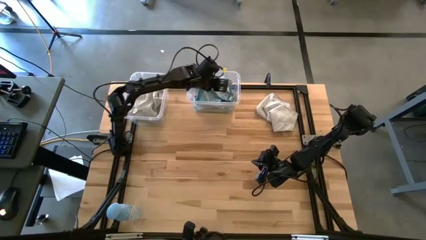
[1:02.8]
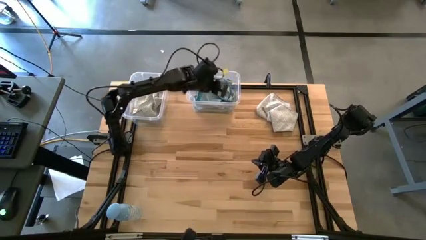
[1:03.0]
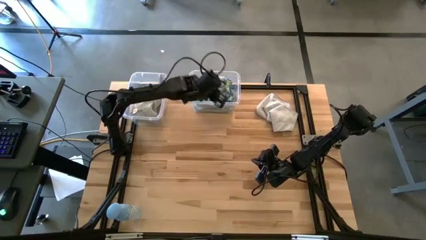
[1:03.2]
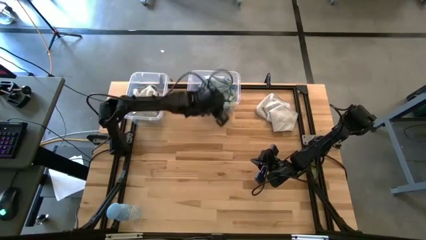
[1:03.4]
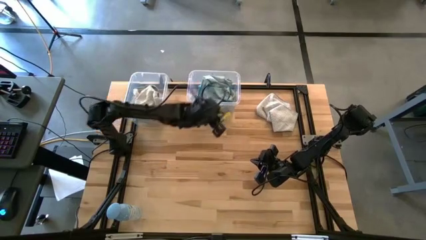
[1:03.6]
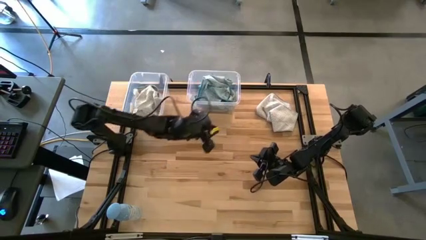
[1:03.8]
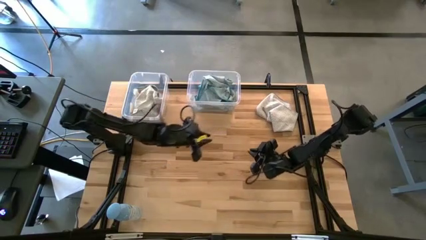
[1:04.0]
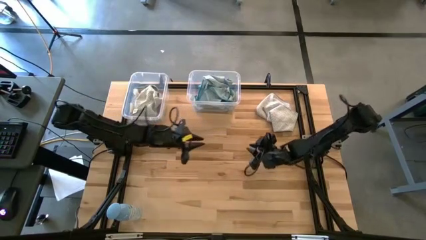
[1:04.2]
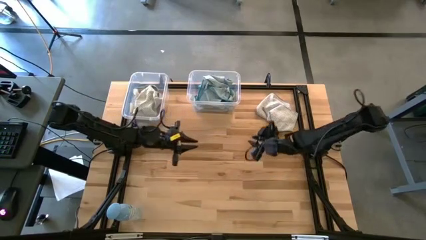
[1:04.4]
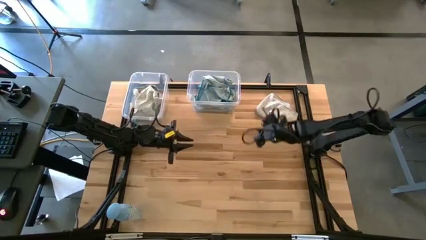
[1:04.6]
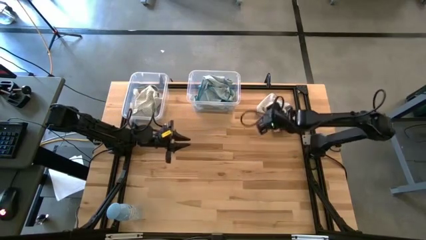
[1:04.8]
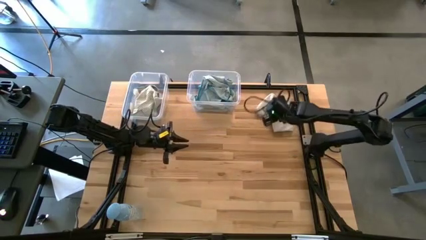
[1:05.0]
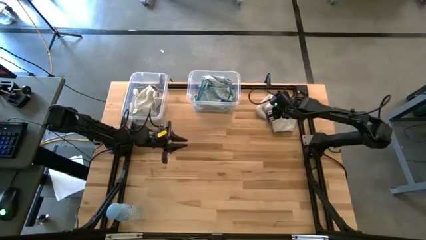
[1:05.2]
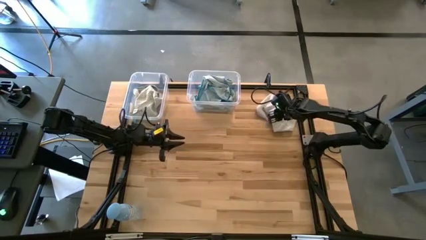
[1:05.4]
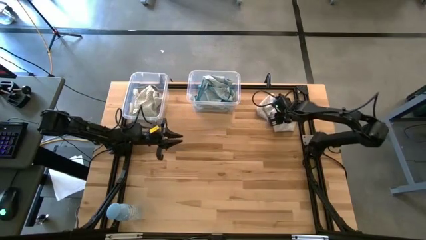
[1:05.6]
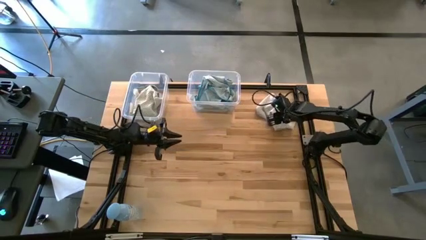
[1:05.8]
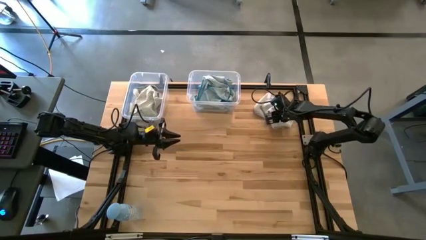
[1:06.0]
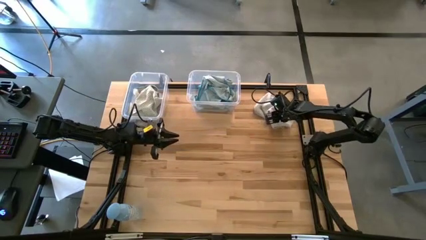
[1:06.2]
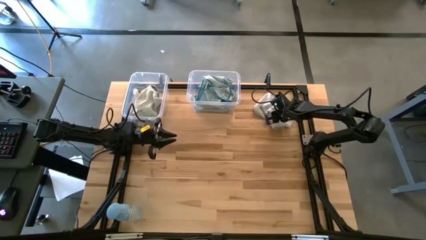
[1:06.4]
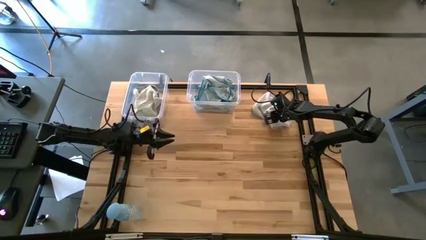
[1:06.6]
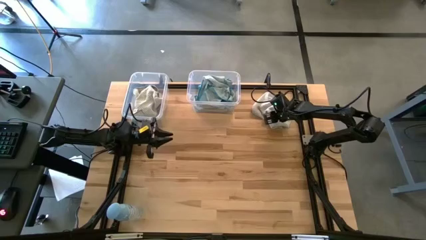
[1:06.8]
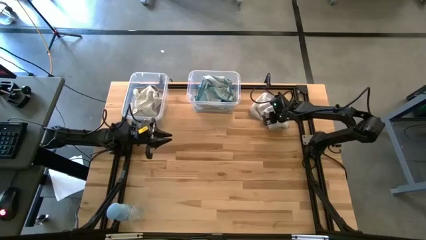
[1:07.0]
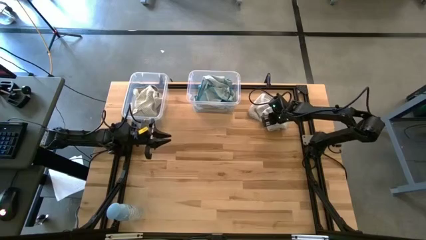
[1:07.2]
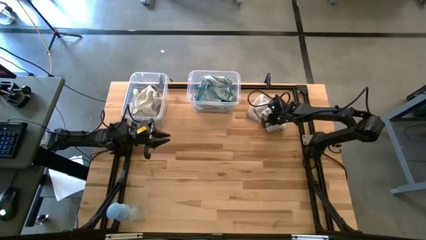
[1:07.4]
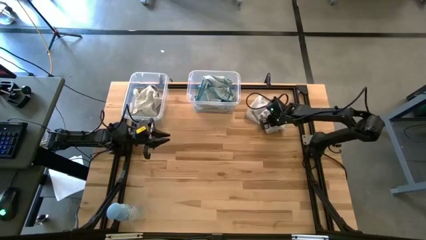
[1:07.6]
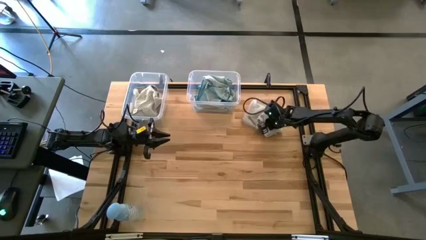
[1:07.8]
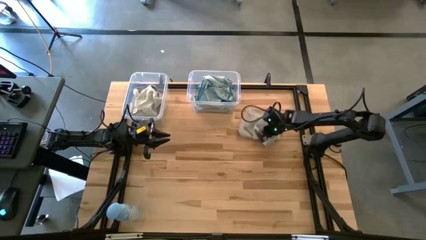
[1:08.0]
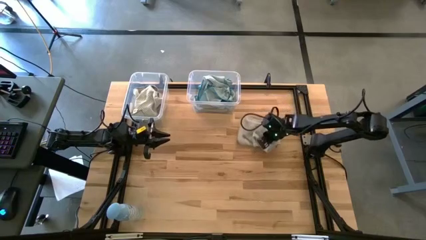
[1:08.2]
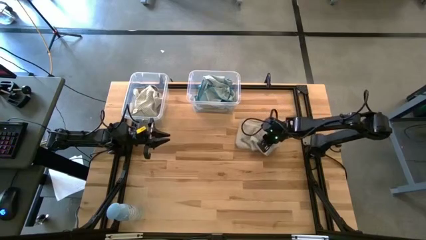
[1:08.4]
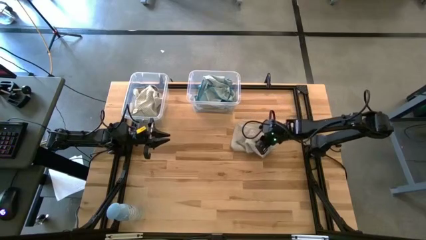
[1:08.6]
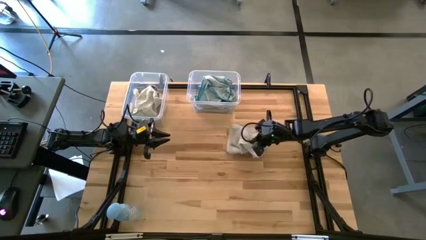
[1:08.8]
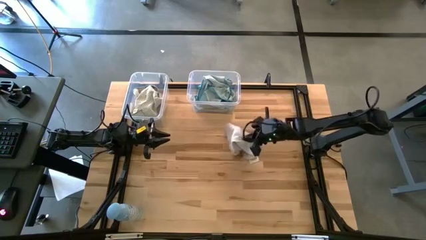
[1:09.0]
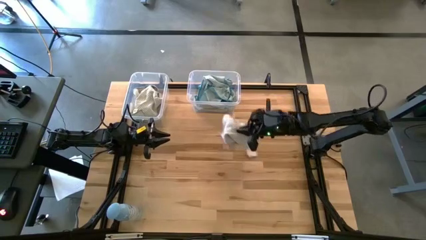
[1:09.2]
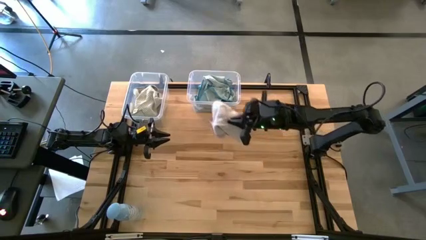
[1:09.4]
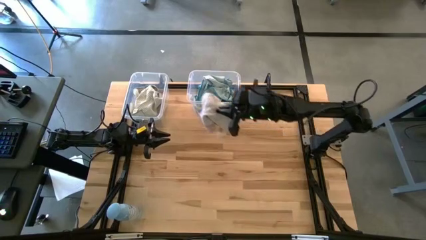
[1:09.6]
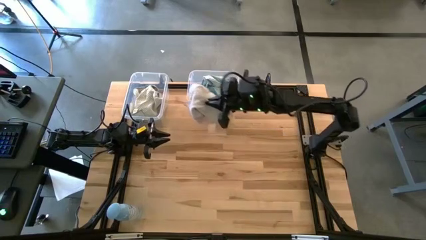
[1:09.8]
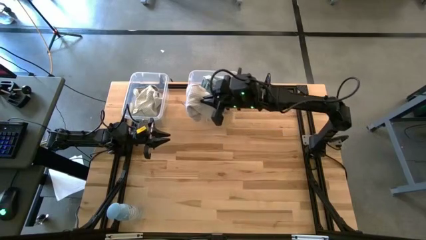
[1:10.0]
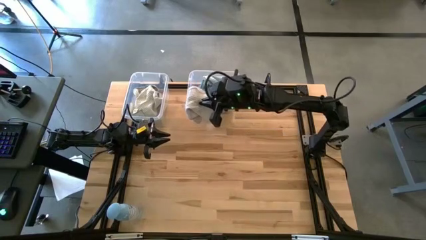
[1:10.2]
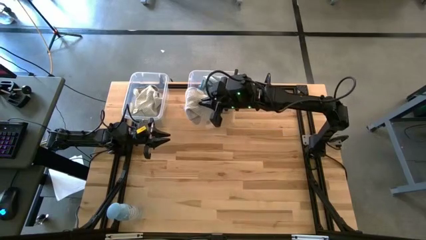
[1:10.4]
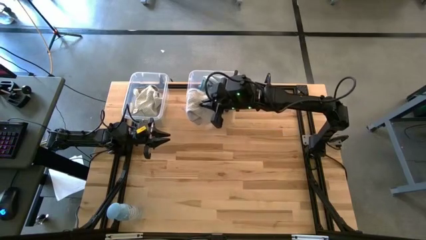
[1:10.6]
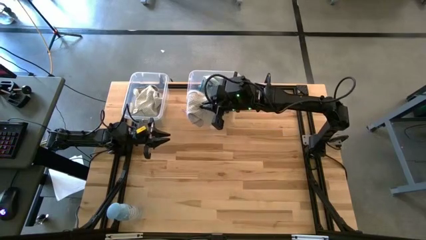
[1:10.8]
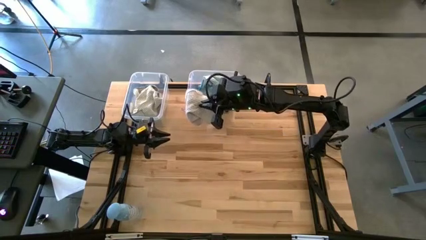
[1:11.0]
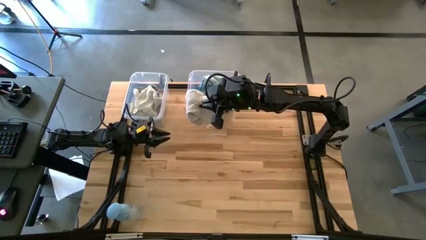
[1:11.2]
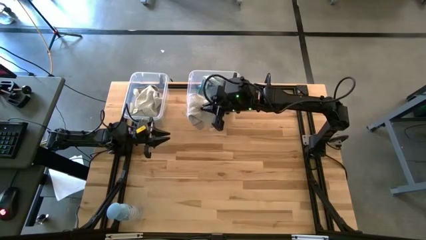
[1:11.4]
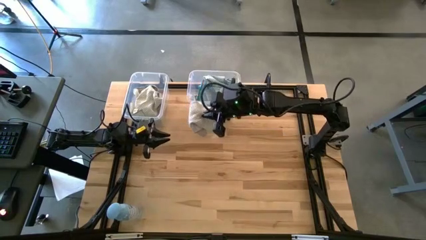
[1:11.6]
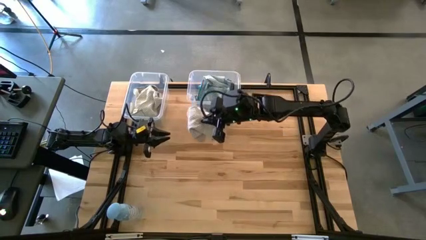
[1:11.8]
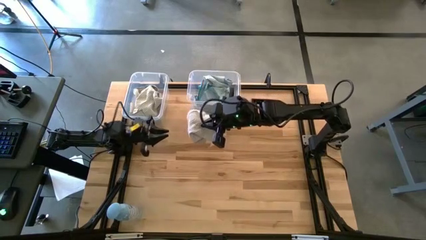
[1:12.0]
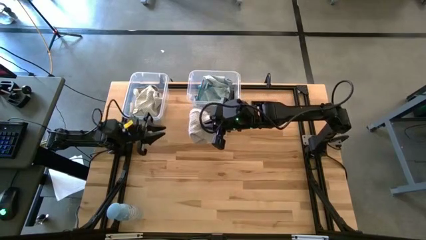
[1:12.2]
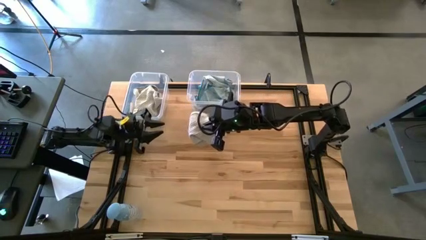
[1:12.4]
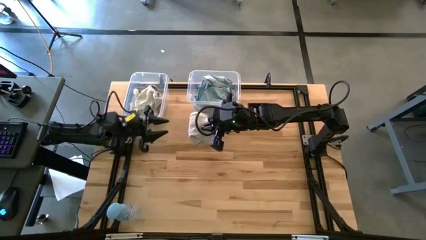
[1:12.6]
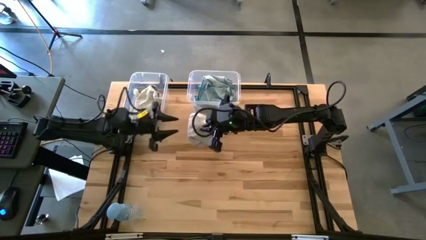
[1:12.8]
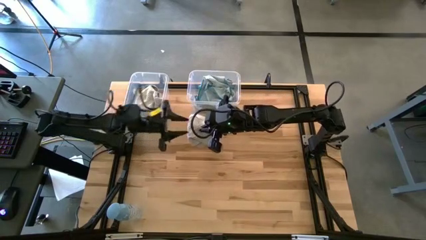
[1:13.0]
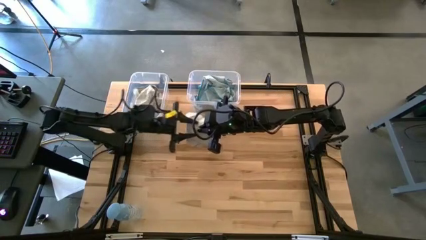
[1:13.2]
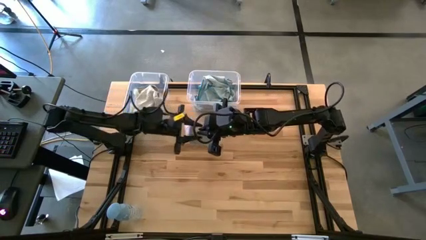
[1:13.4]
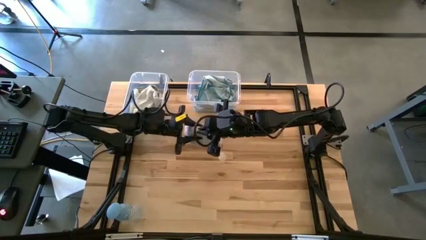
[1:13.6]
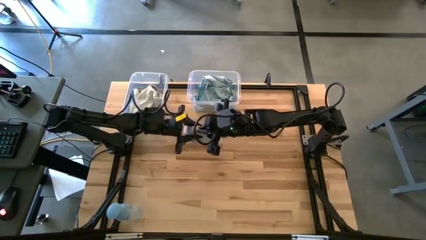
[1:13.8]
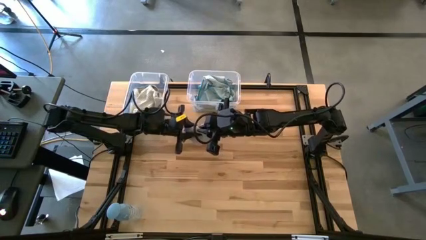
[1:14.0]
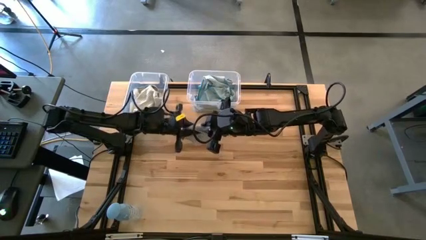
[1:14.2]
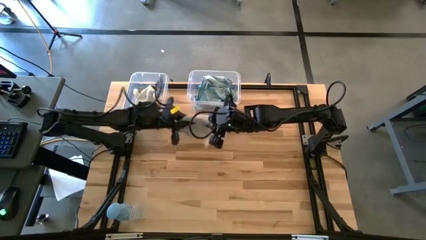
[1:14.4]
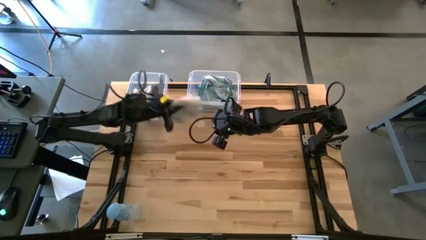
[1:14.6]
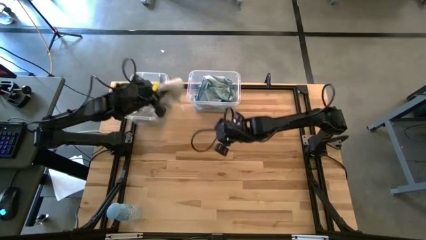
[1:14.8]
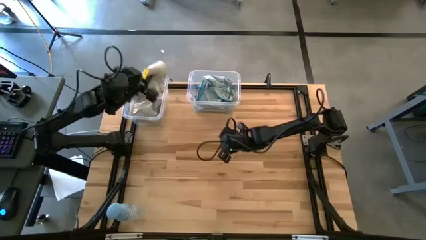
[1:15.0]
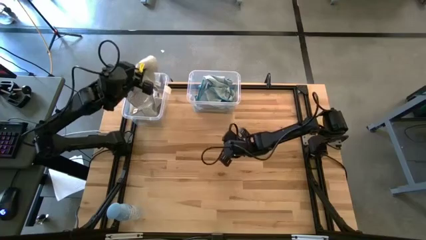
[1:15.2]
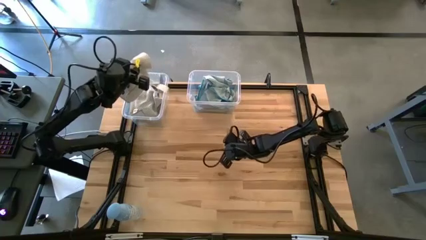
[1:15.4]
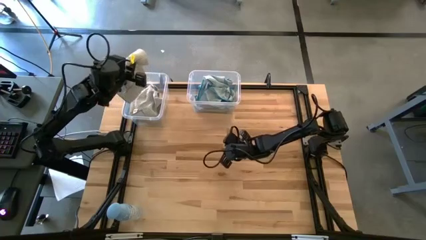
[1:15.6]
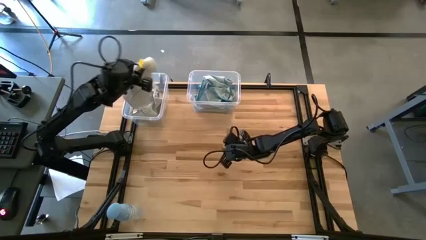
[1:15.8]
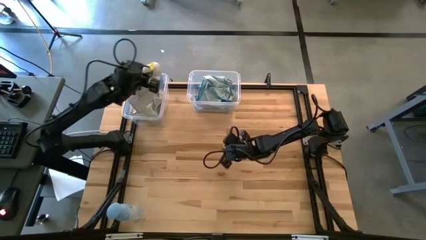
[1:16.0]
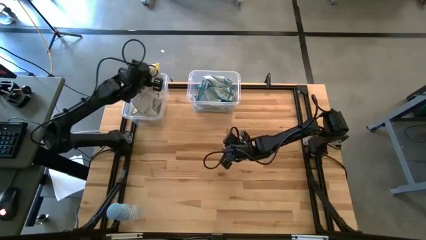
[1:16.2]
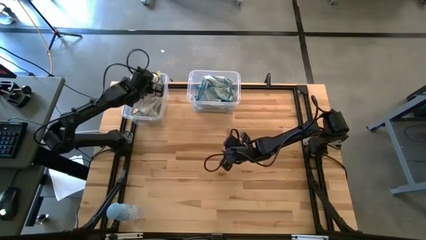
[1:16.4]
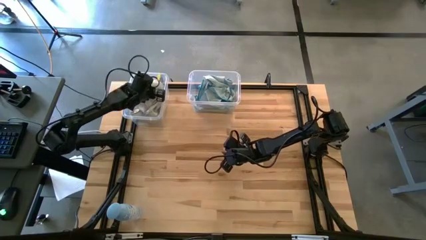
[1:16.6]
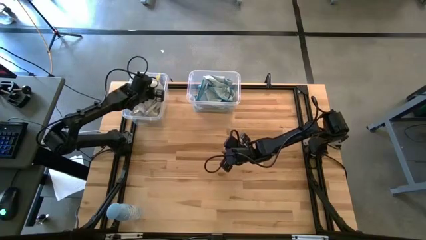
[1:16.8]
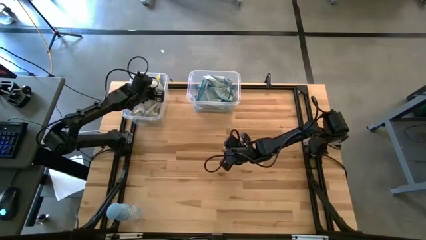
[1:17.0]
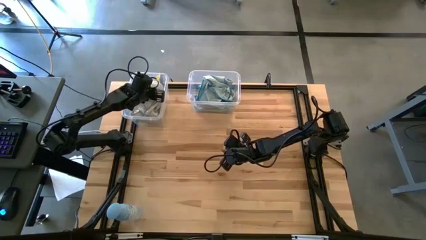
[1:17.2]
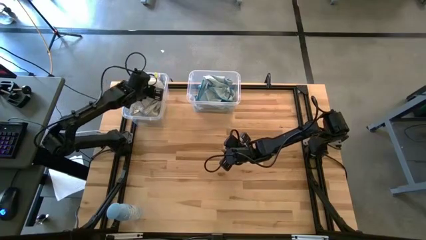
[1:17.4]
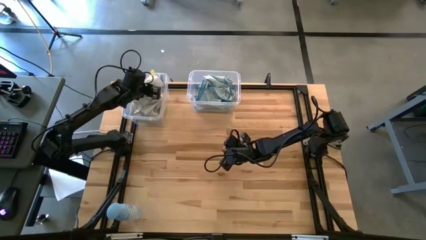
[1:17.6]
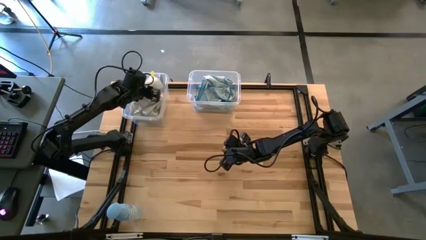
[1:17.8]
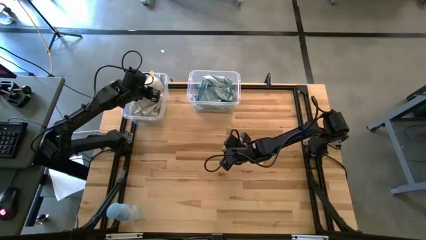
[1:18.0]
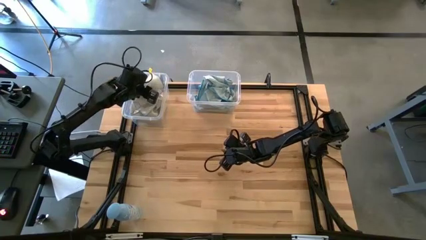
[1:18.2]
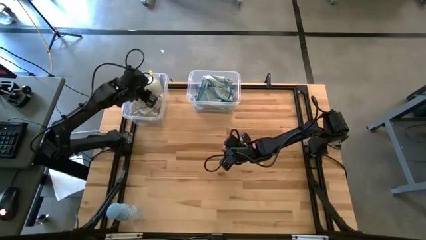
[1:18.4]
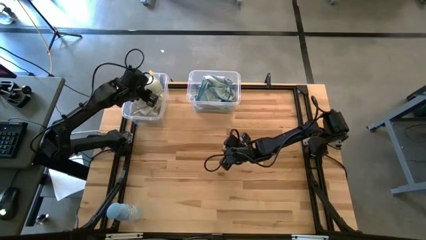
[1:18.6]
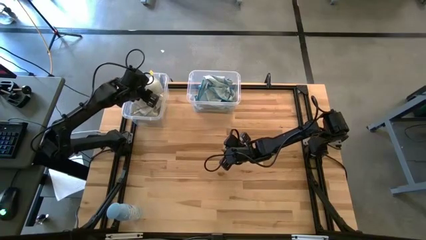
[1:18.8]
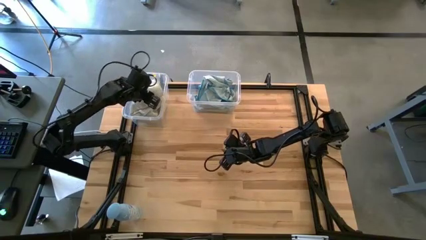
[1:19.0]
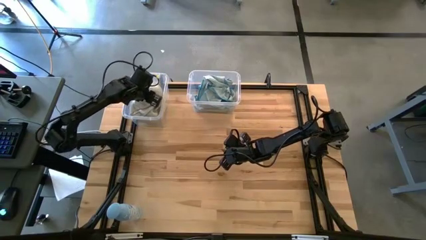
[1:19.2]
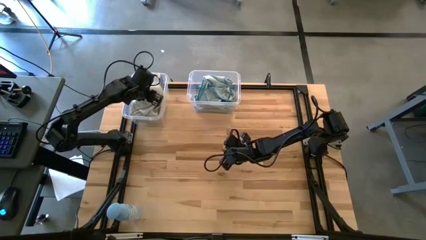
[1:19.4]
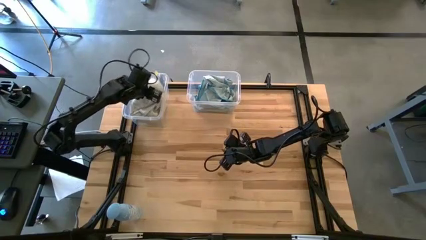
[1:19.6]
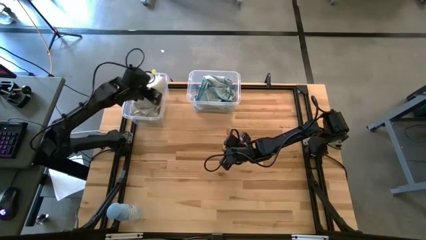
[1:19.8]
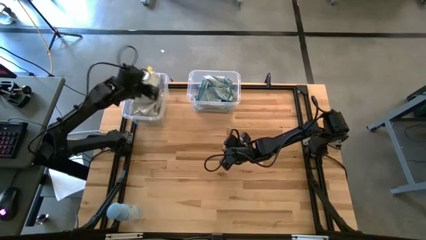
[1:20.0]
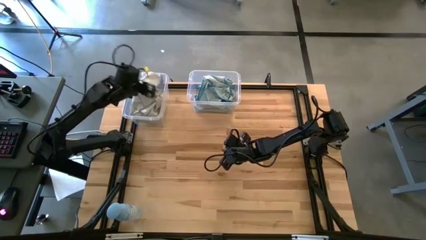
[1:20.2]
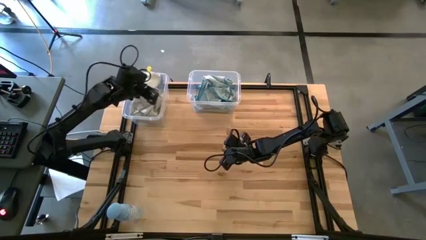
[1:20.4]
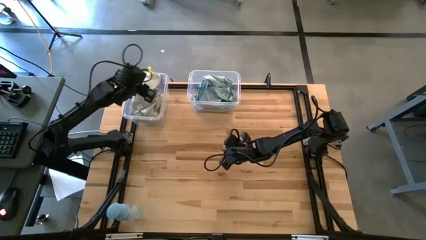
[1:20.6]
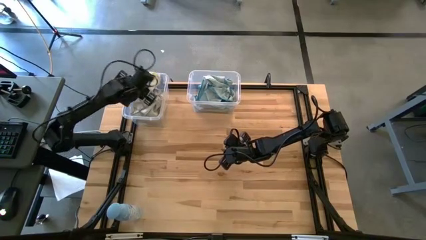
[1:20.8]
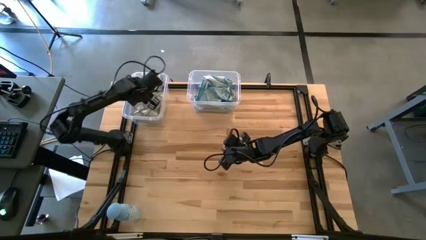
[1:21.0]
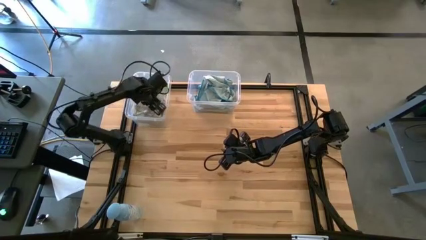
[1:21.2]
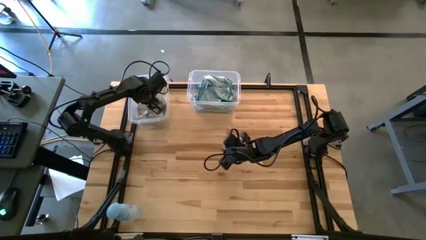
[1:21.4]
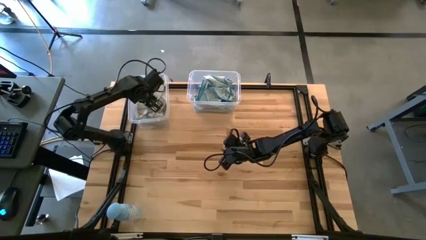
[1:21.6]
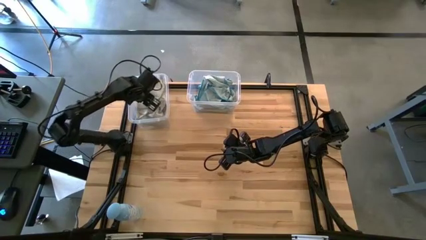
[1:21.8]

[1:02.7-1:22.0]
Task: Sort microfiber towel by color & place in baskets
Put the brown microfiber cloth into the left transparent bin
